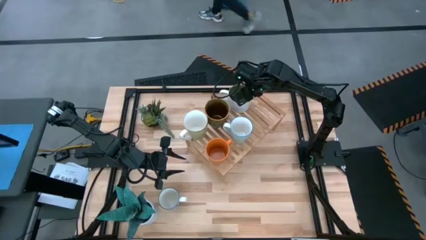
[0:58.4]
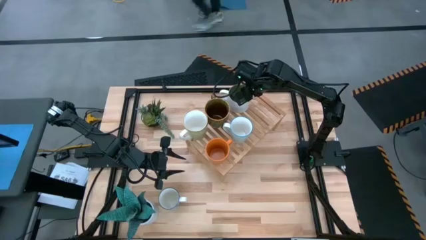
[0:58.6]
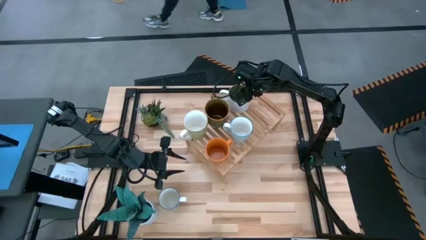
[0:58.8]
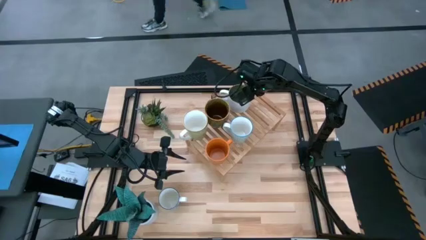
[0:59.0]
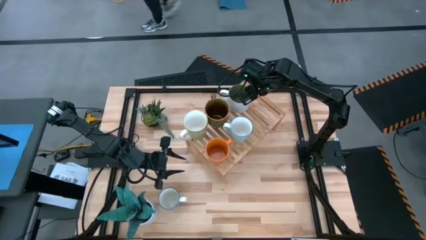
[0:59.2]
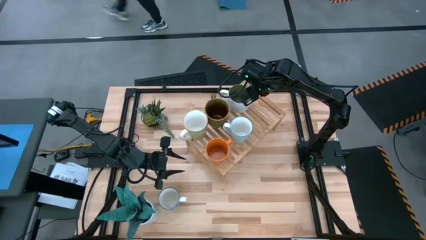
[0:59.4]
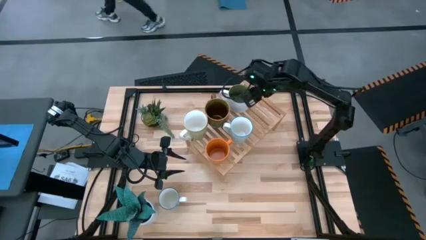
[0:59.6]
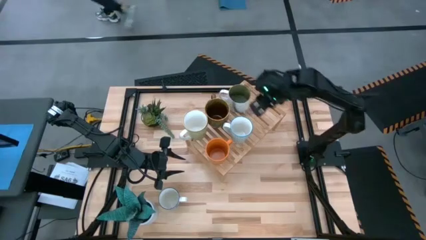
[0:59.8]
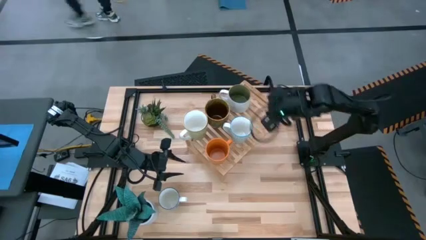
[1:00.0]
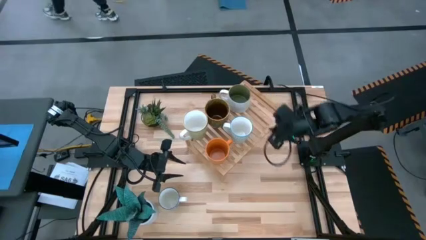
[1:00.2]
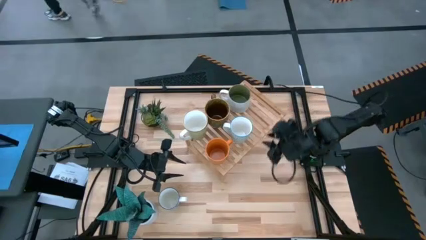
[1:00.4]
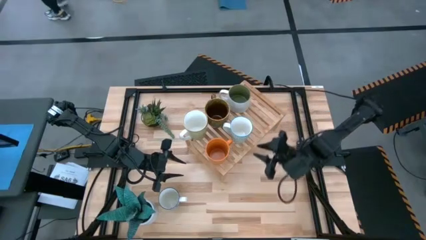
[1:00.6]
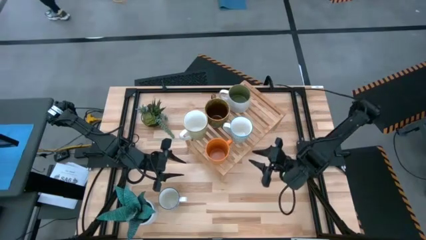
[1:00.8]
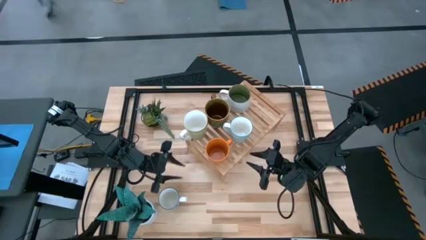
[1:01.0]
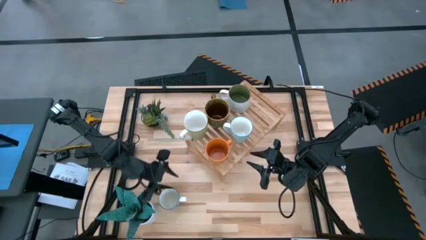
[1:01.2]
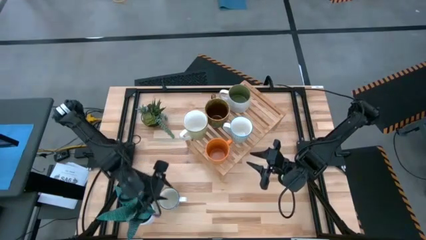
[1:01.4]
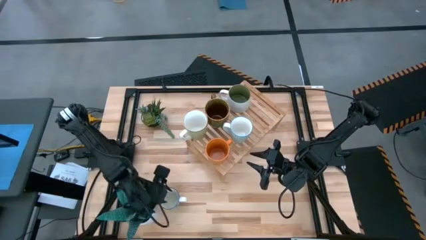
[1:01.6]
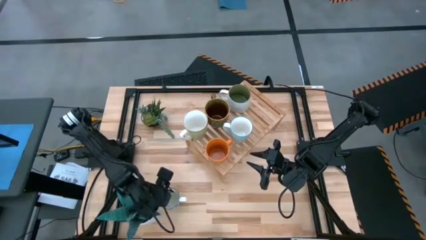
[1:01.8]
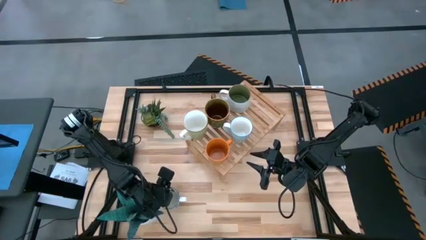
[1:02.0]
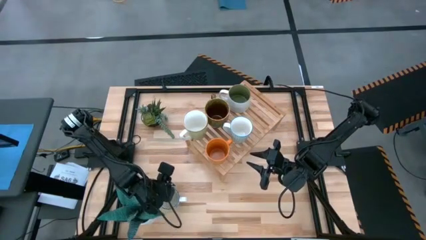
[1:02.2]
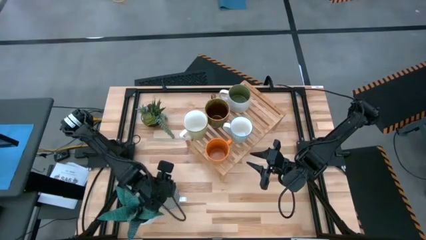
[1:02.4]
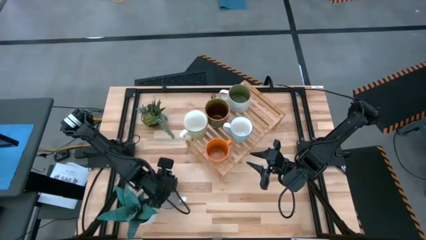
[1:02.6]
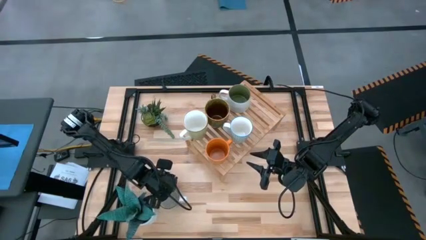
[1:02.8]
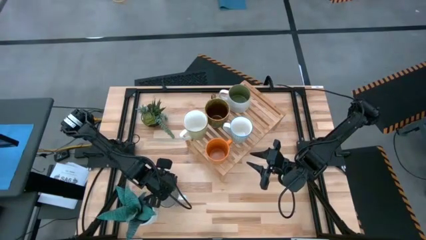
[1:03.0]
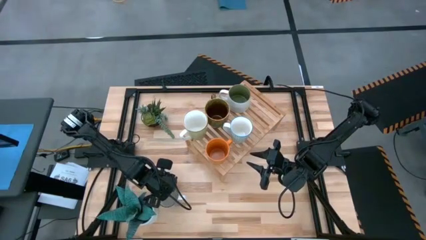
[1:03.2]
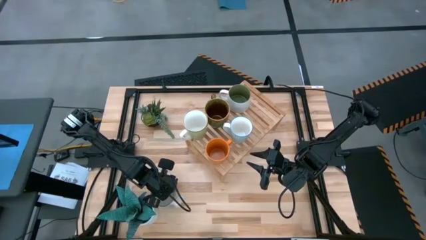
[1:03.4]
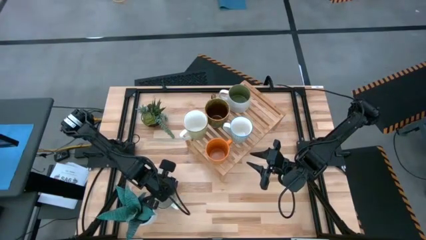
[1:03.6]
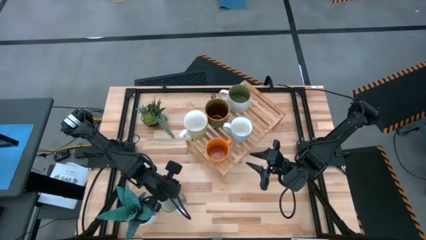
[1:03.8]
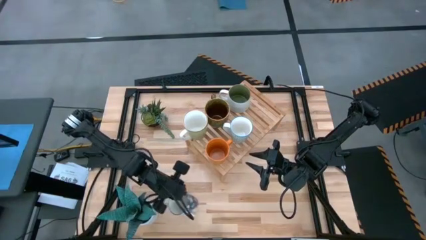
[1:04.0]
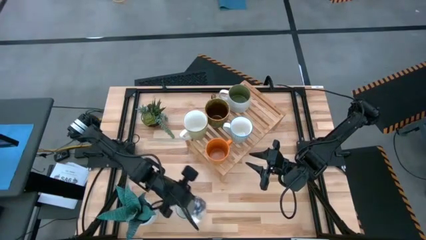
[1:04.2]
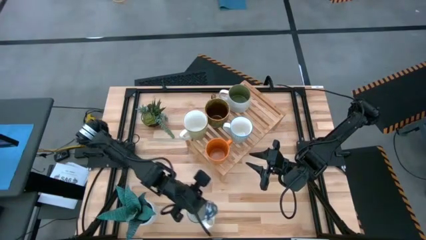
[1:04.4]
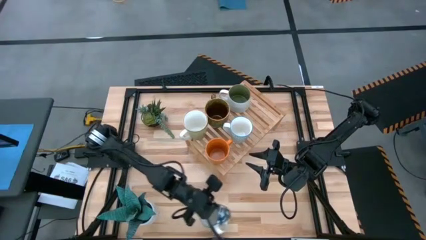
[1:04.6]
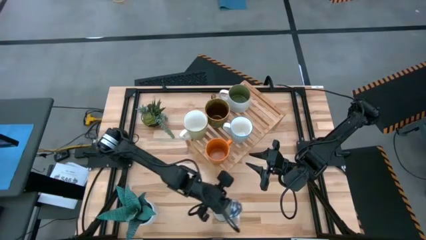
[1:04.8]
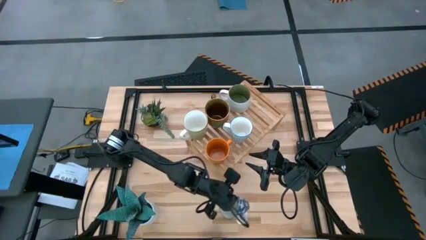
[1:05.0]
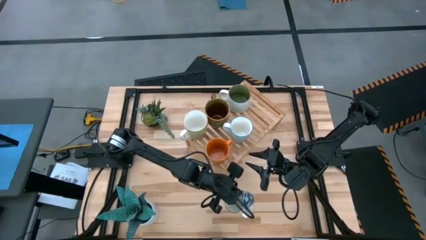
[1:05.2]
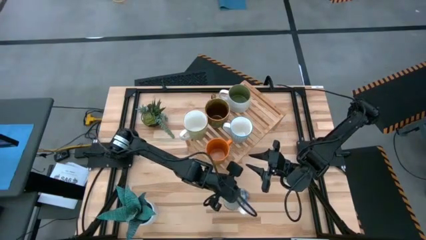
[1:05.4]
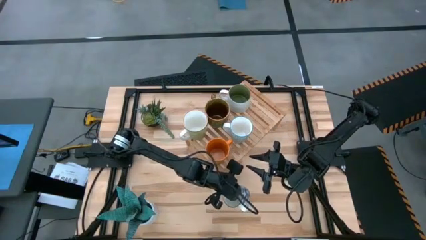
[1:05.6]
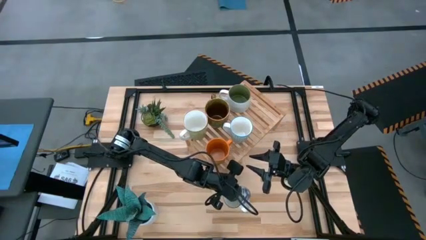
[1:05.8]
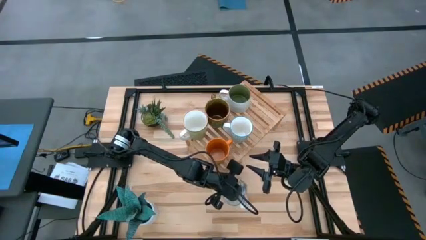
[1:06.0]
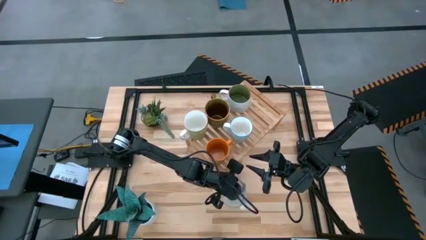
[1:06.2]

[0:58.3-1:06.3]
Task: Place coffee mugs
Put the blue mug on the shelf

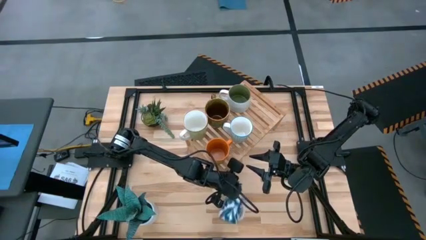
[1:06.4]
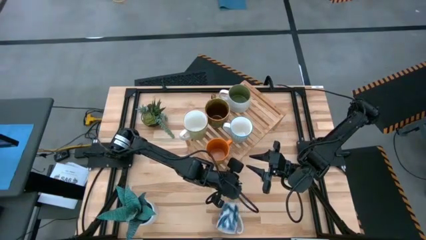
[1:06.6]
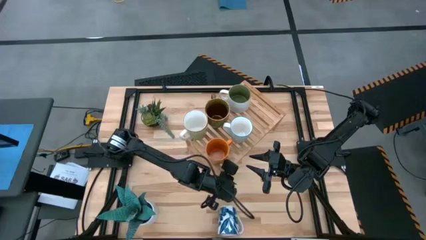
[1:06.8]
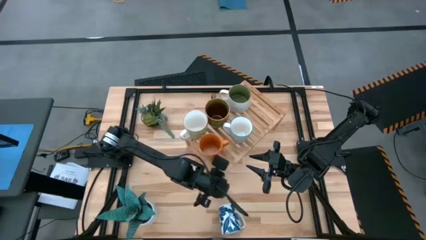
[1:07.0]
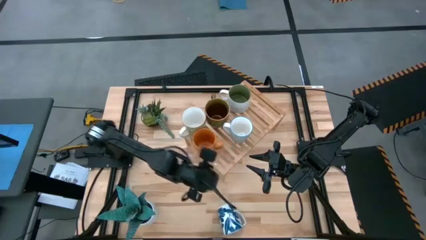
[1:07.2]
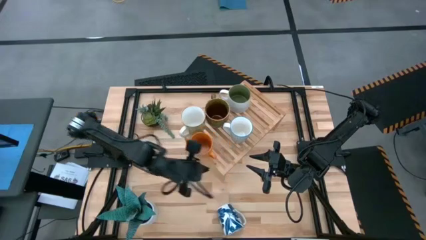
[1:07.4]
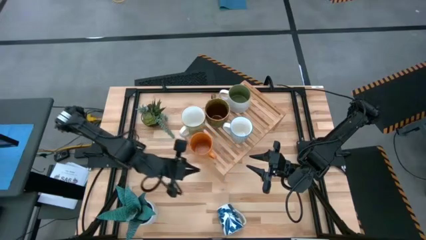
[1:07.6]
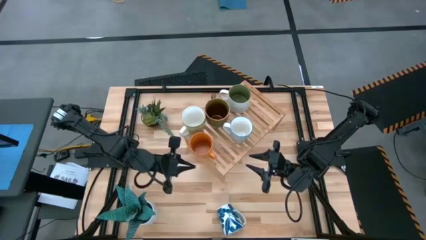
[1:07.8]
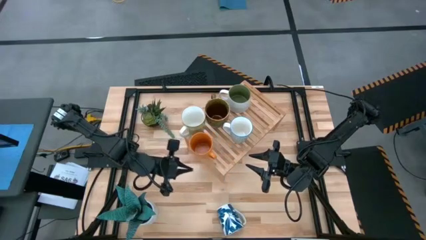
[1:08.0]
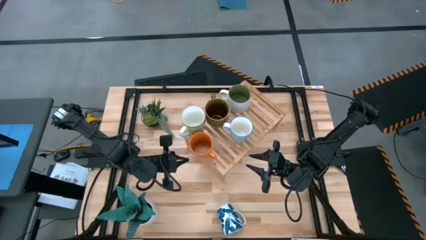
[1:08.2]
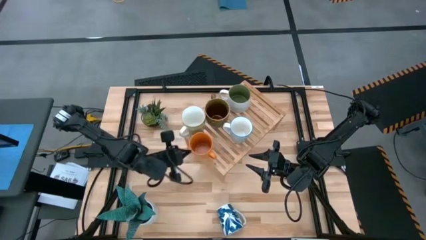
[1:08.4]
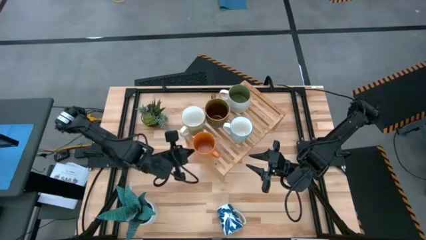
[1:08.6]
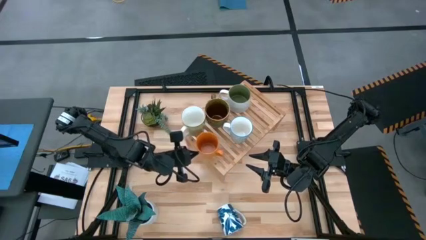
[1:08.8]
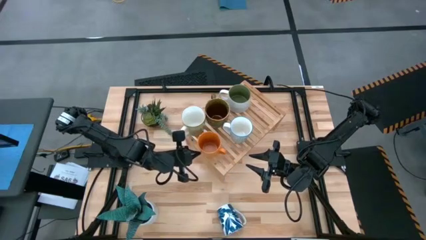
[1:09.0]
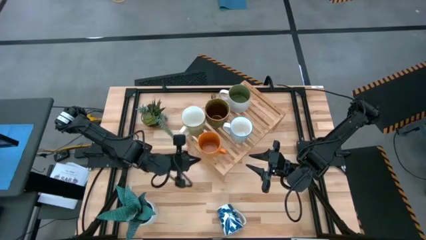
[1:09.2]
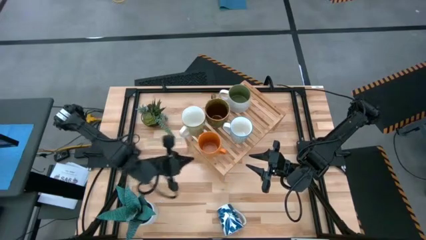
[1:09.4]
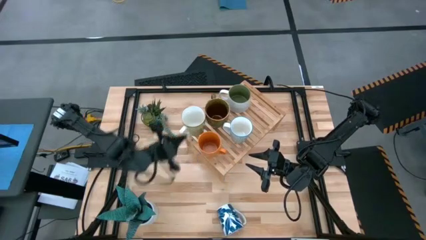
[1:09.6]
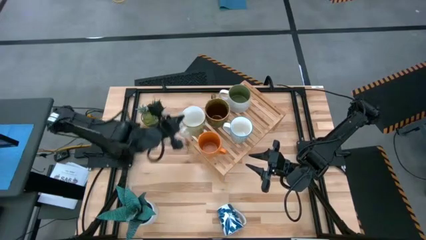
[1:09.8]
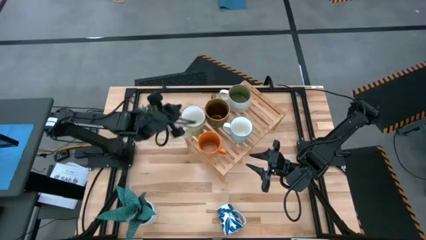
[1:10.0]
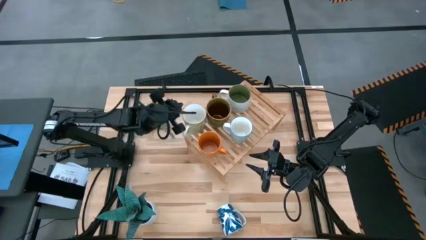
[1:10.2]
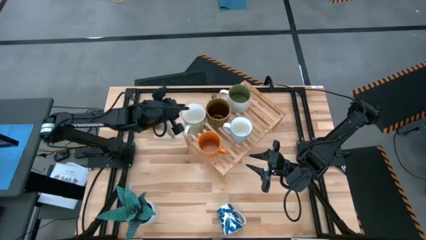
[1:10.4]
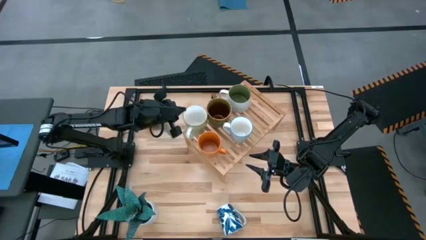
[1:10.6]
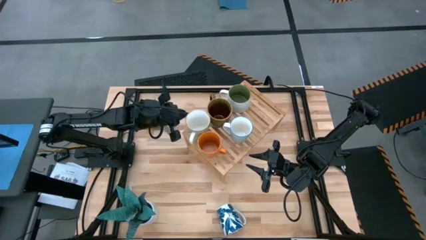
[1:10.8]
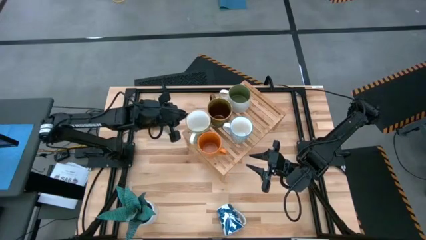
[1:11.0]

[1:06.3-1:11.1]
Adjust the mugs on the shelf

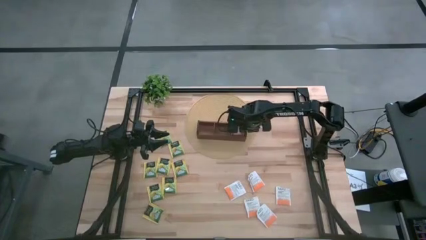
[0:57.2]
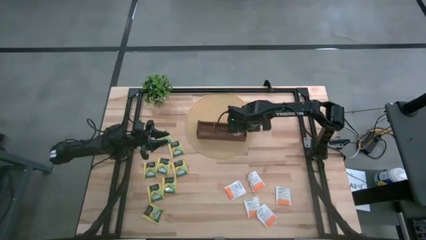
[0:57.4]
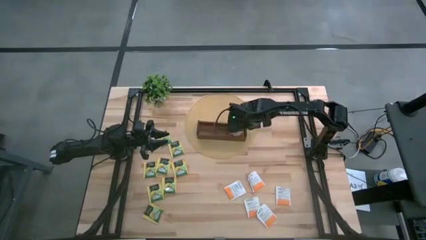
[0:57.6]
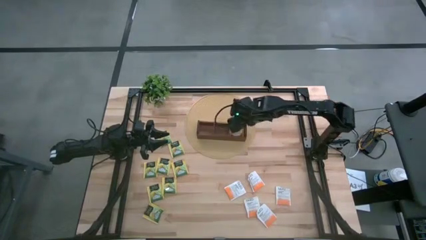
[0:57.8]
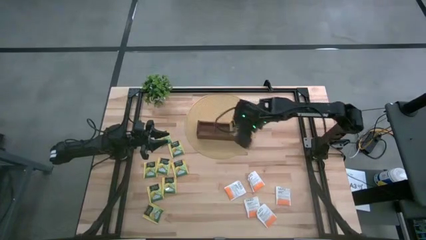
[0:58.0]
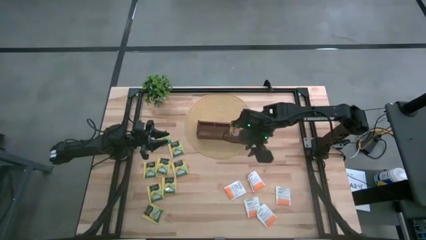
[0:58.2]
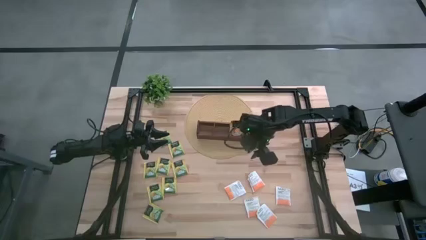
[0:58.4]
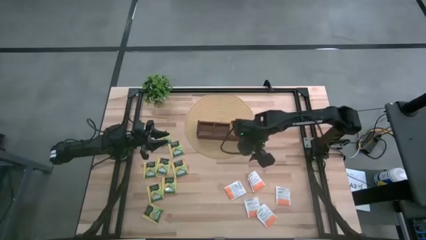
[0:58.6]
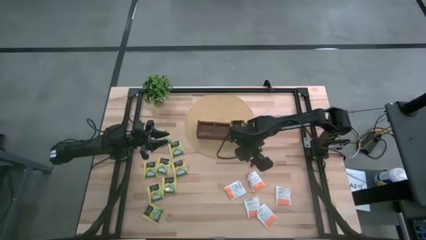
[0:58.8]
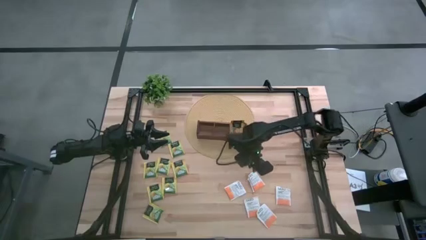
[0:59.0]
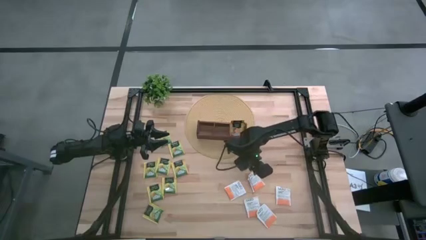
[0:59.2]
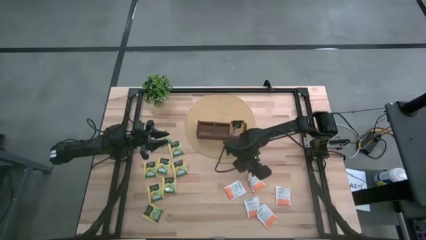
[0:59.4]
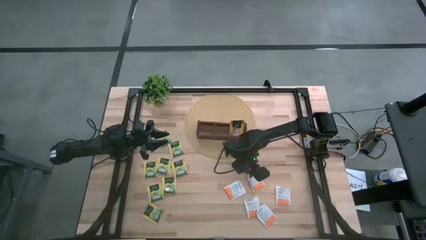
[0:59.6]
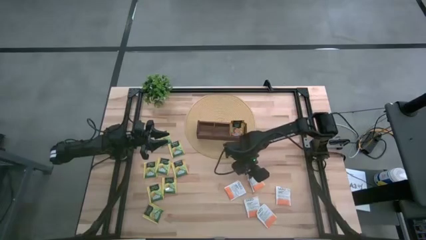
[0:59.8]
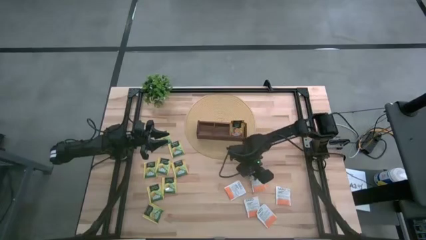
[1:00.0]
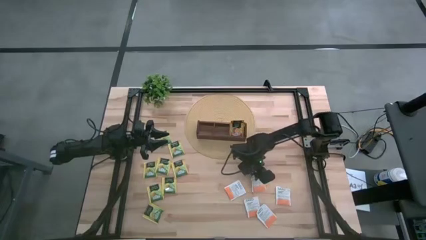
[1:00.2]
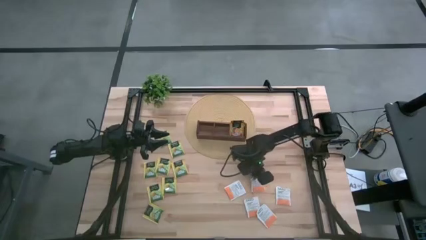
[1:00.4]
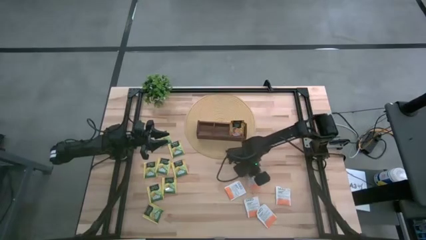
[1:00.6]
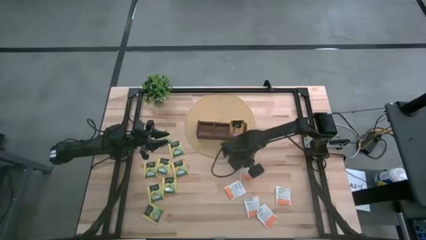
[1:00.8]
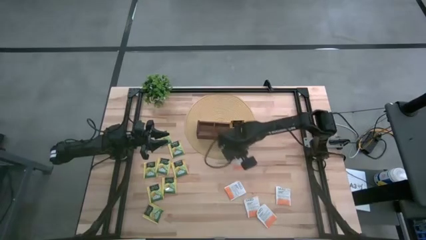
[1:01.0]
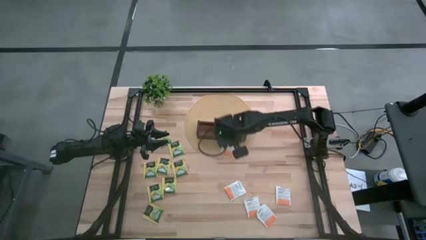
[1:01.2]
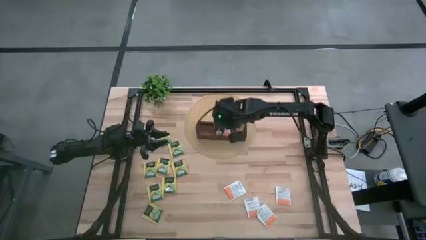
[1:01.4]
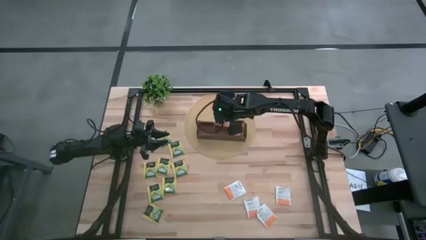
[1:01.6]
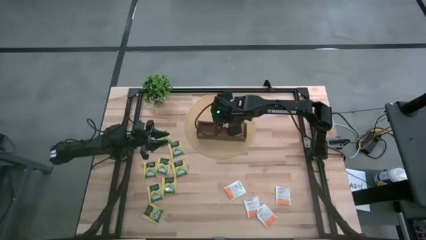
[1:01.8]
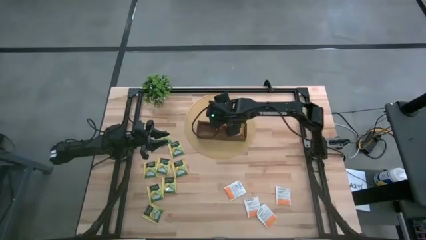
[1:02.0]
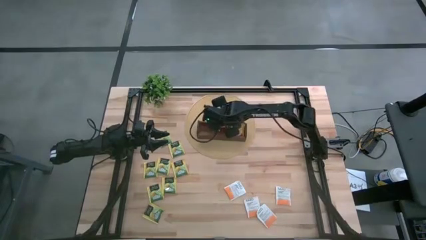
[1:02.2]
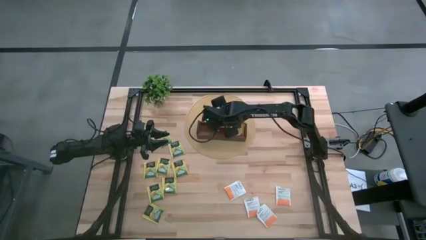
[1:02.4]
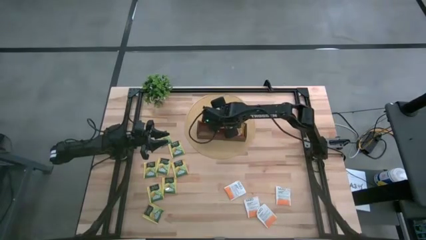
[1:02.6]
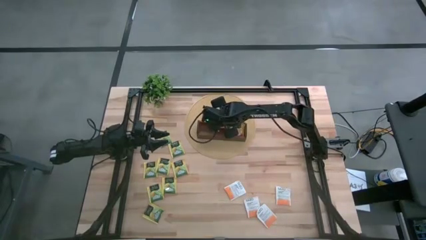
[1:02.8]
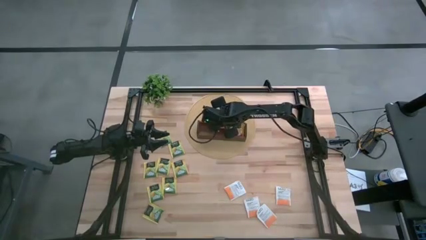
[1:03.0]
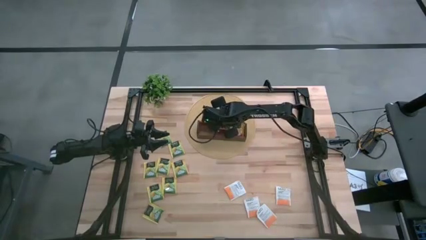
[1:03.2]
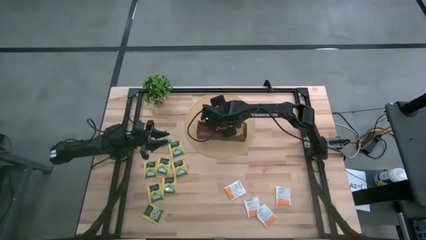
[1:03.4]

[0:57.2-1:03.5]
Task: Pick & Place Tea
Put the white tea bag into the middle section of the wooden organizer
